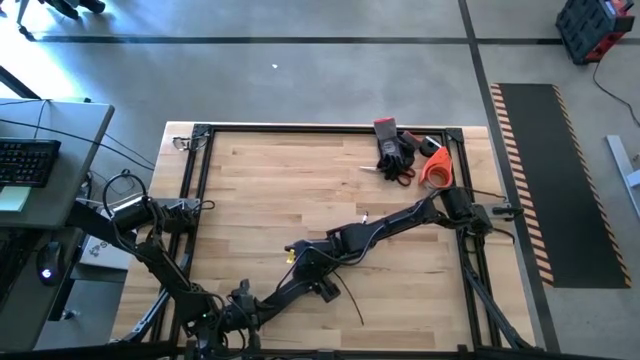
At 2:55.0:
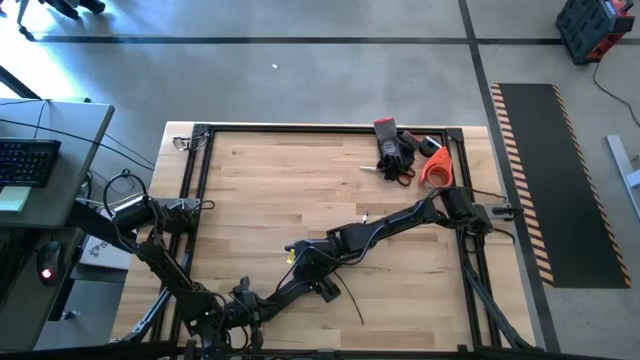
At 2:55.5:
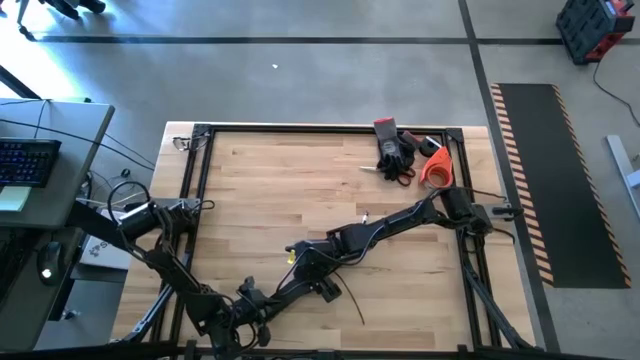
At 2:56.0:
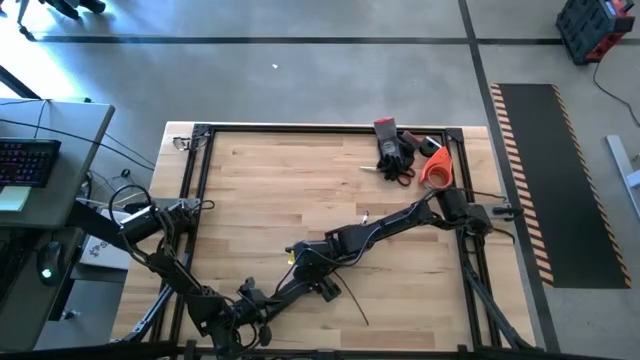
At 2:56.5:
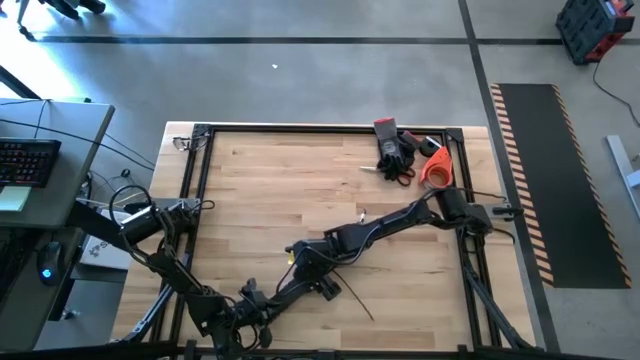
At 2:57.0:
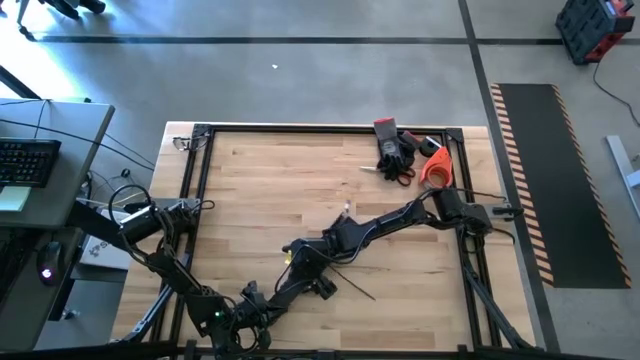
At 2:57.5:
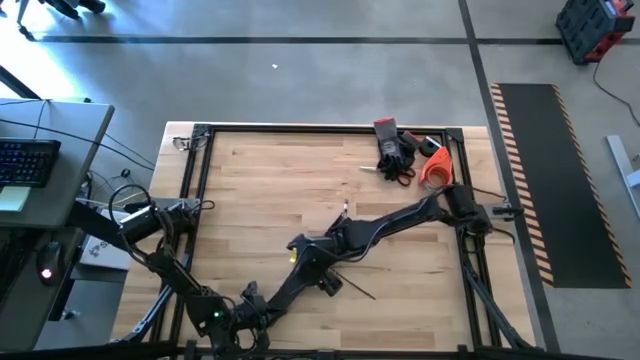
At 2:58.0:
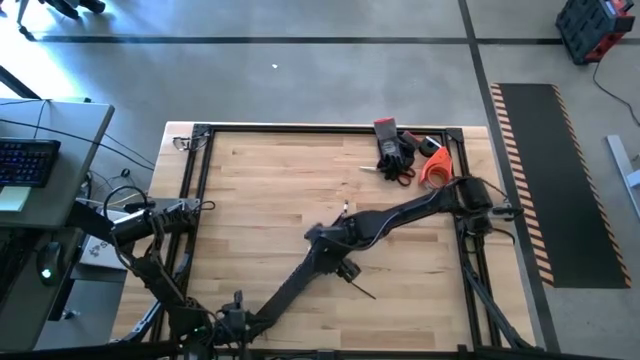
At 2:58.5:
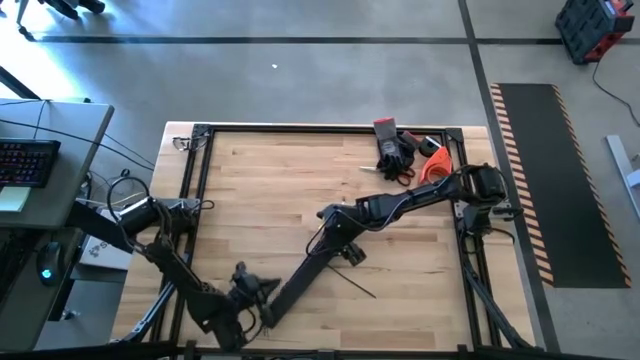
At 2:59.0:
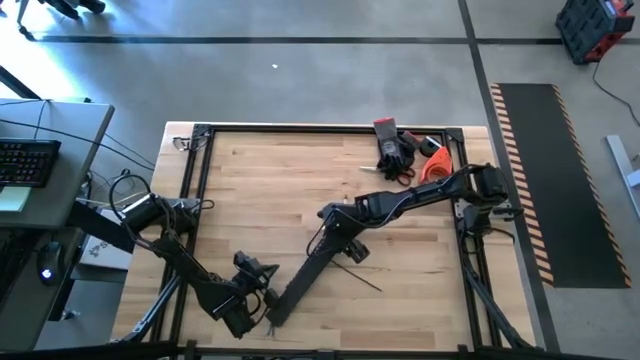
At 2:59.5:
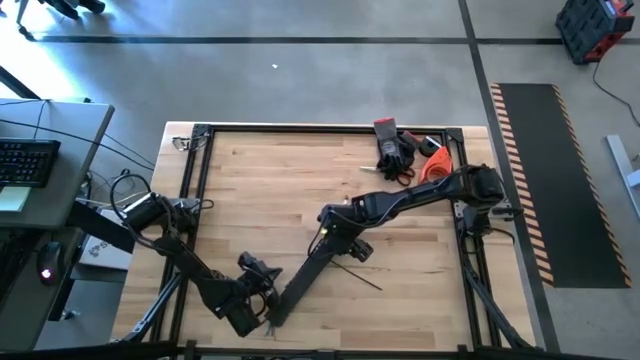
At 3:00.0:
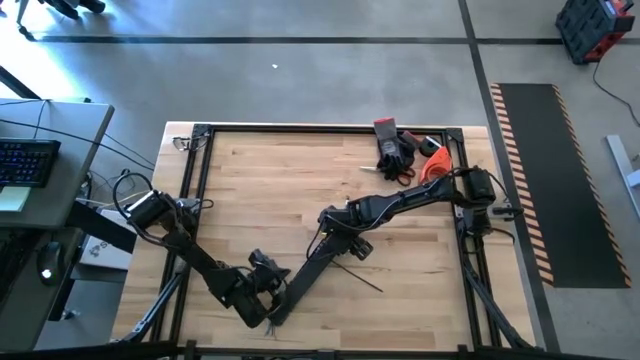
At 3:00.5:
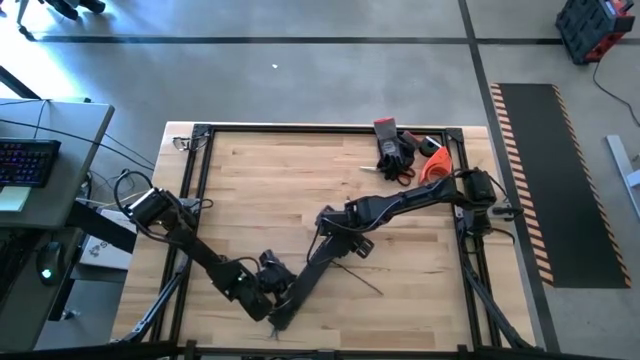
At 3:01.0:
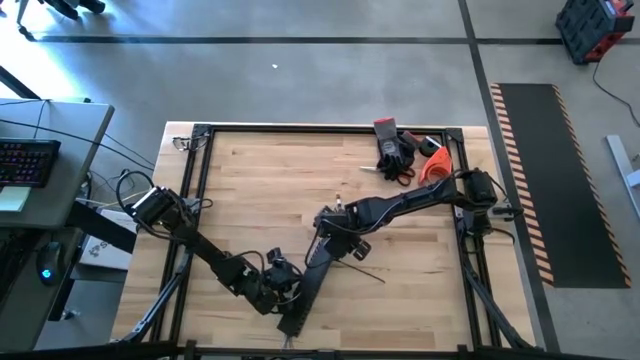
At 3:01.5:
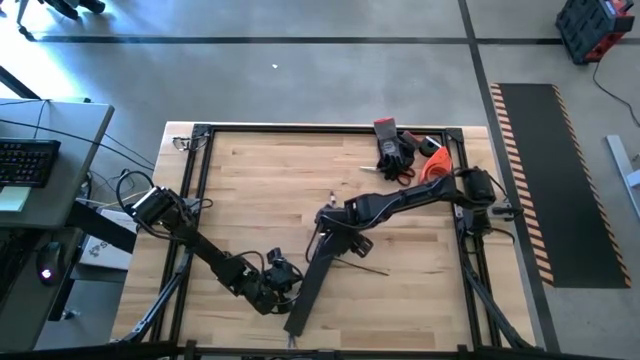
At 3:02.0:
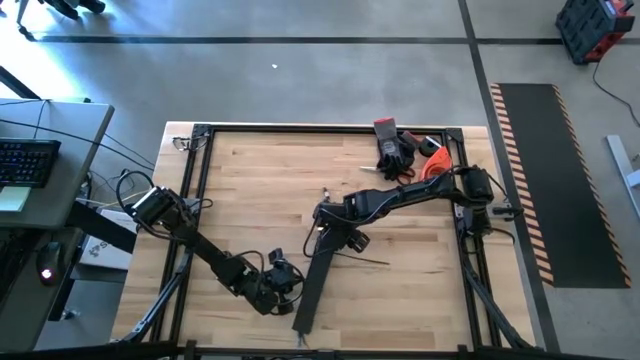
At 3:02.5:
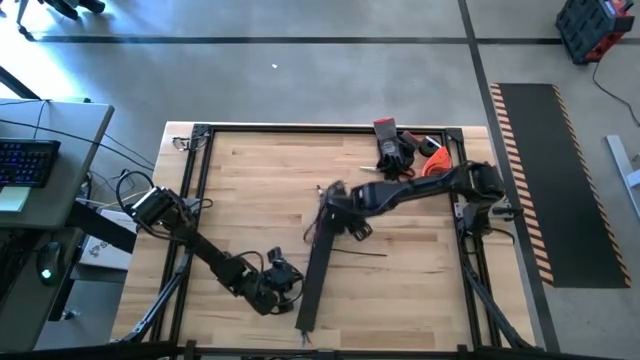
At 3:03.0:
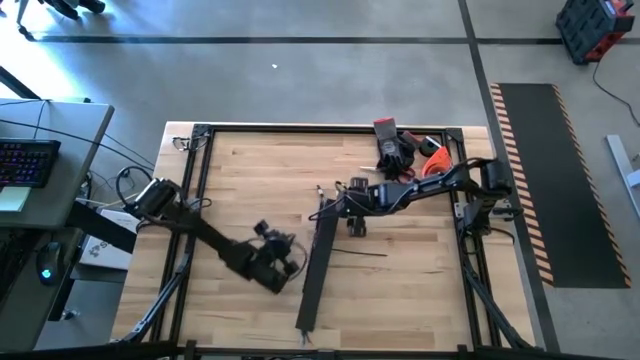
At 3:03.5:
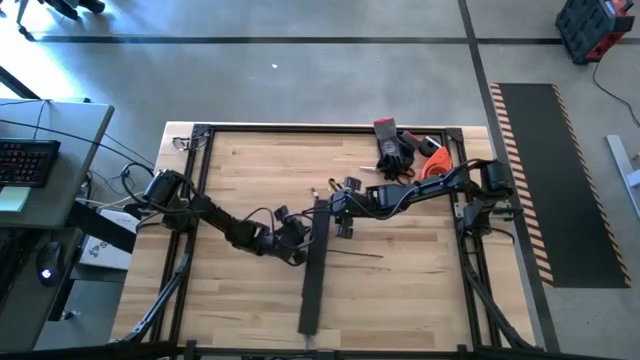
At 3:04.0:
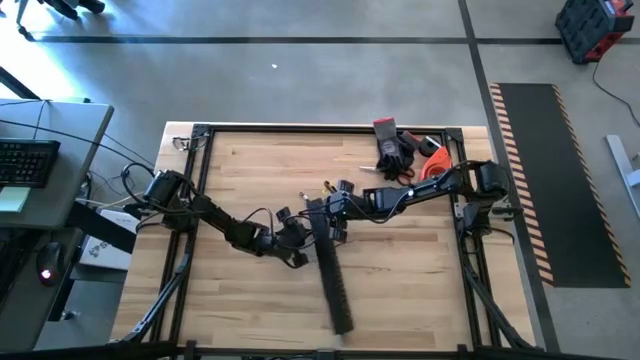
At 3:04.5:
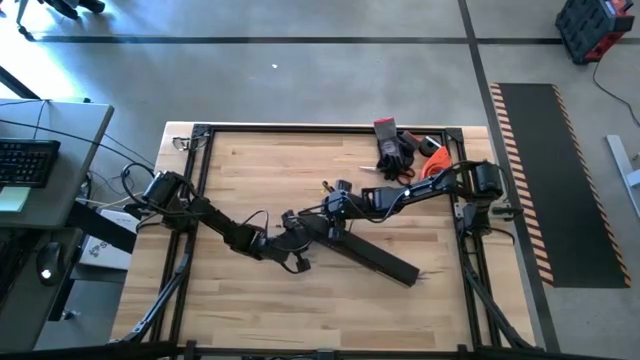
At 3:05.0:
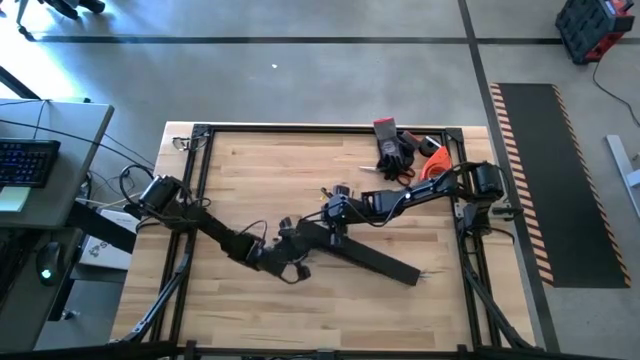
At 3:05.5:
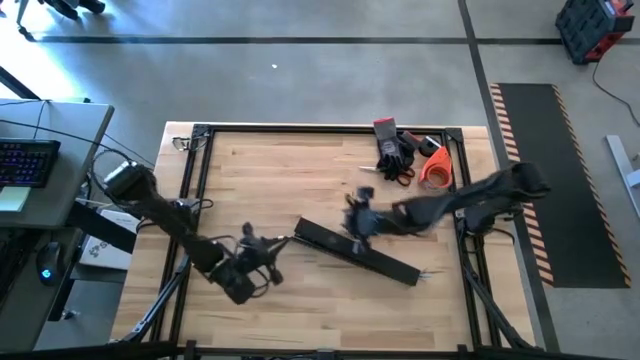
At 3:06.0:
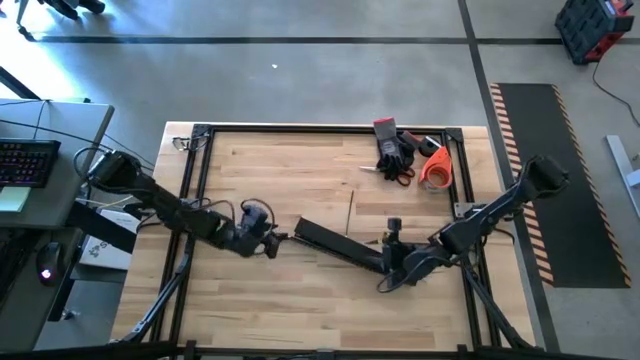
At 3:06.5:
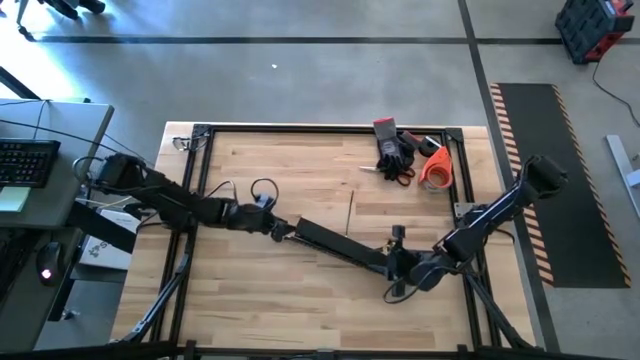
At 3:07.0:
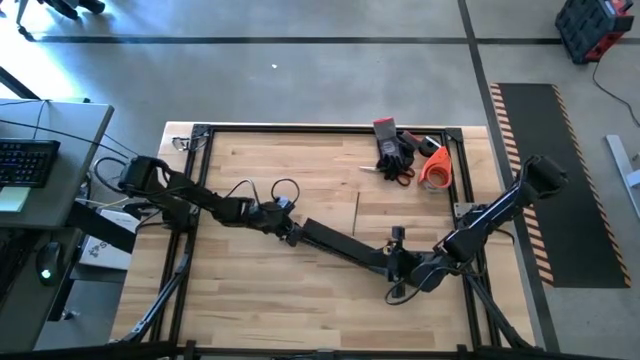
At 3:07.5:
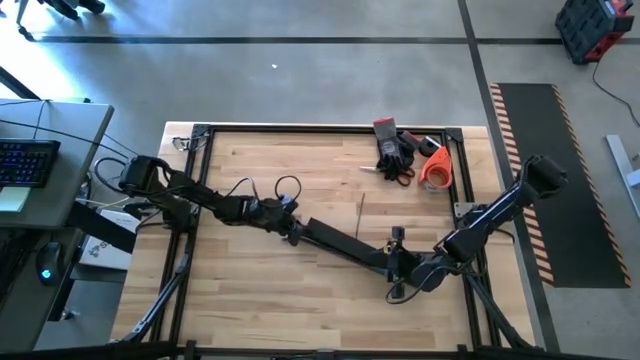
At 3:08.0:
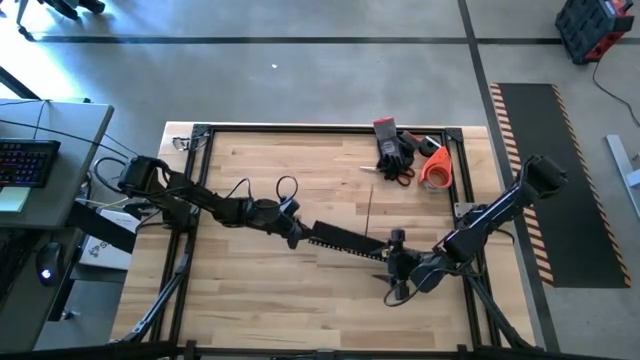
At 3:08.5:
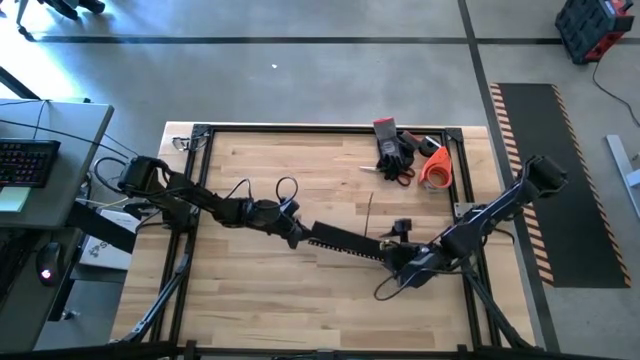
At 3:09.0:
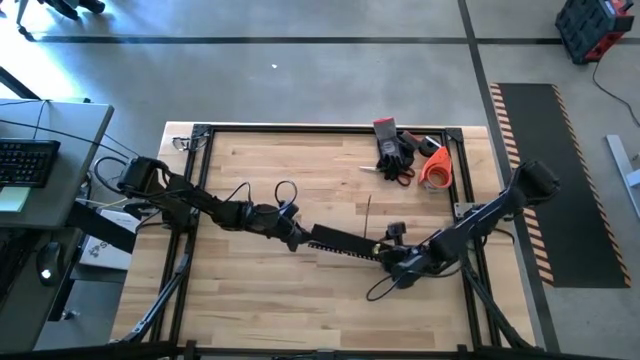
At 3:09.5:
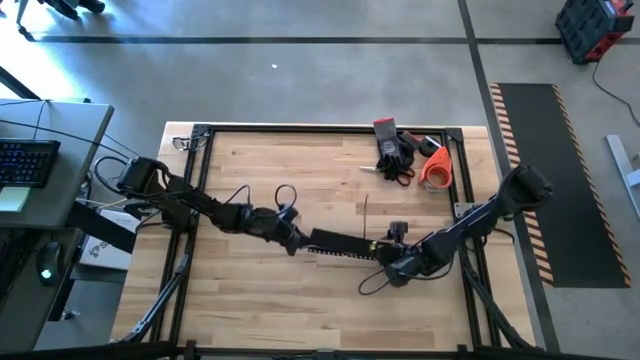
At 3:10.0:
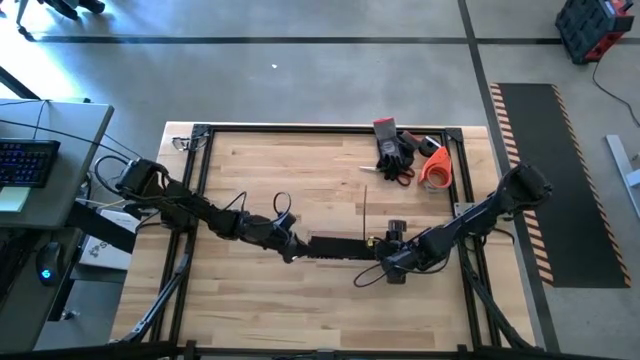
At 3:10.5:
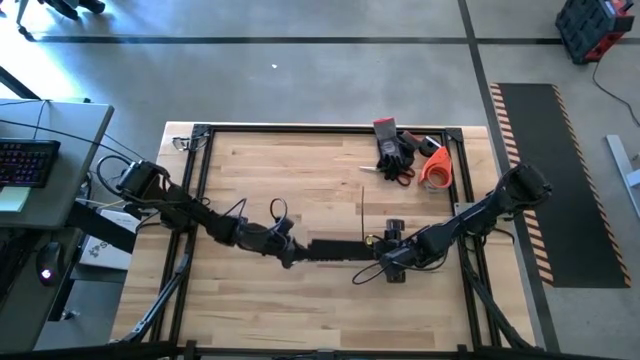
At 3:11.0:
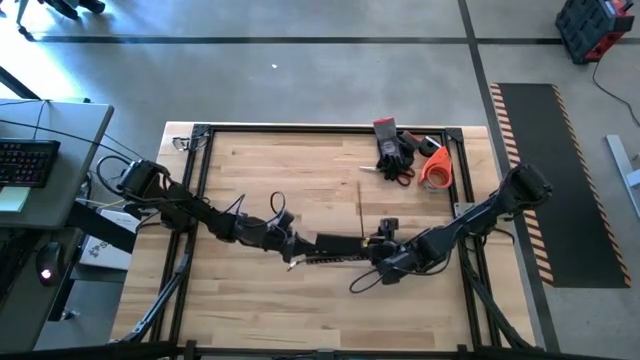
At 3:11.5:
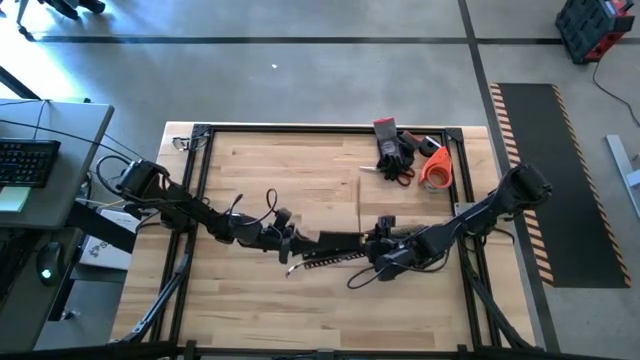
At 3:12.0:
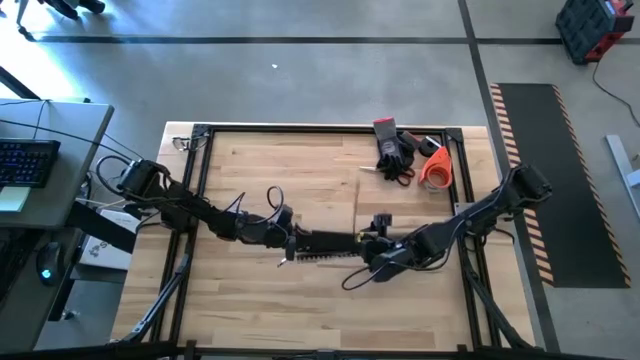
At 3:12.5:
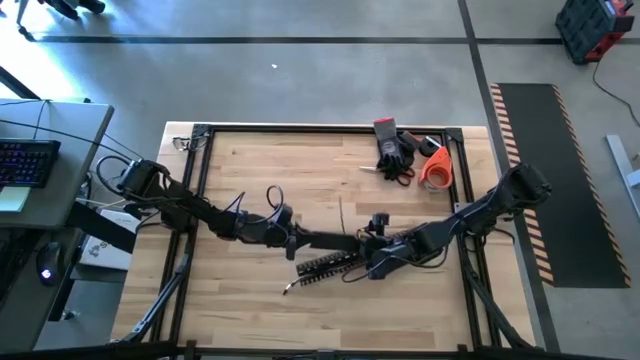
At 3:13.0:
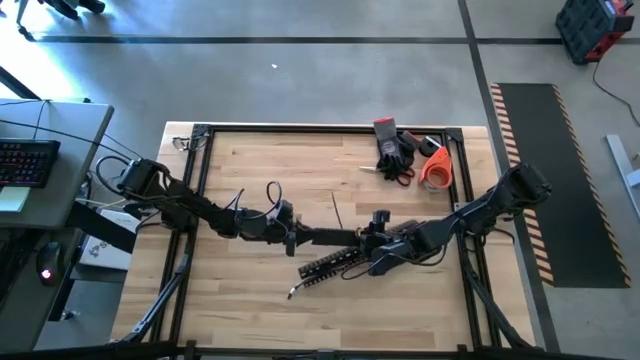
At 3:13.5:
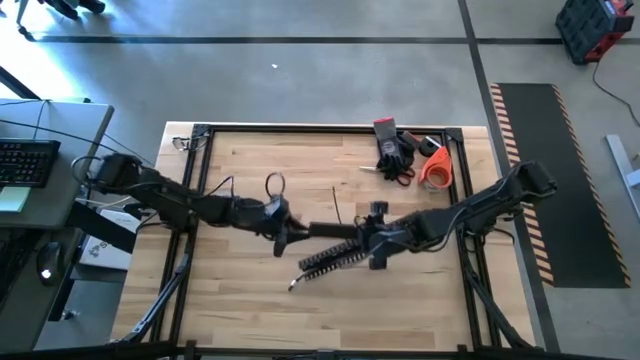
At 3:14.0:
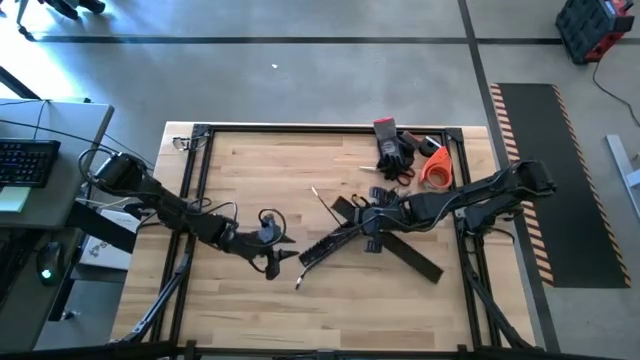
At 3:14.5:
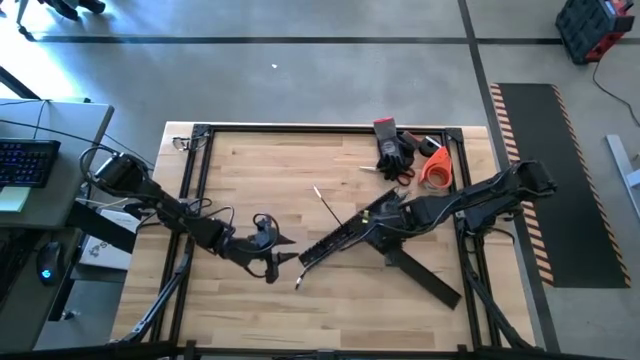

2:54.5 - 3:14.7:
Task: Ziptie cables
Close the black cable duct with the black cable duct cover
